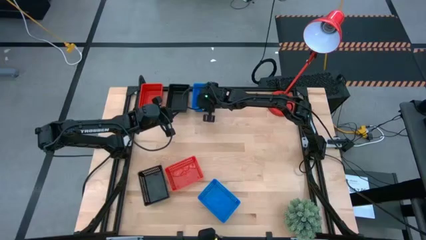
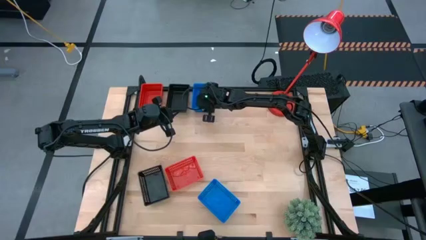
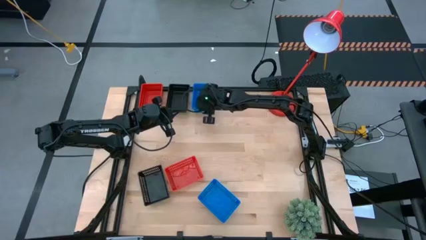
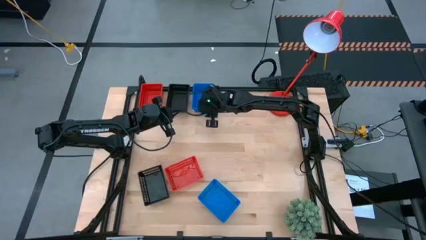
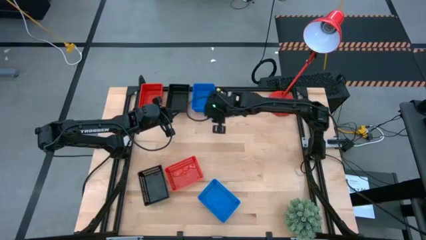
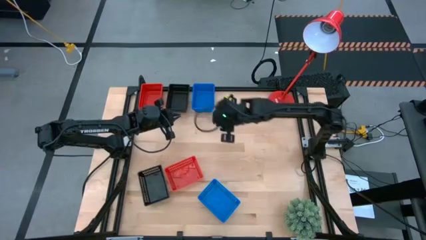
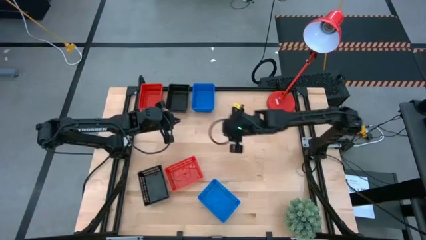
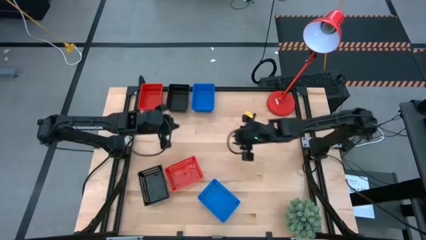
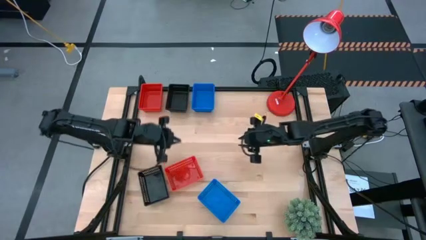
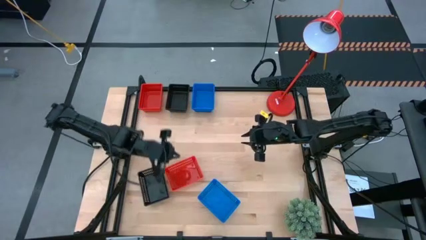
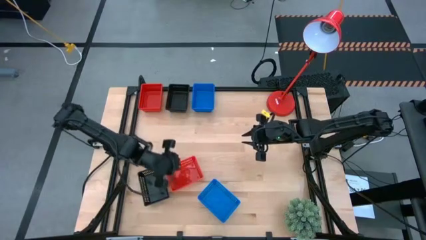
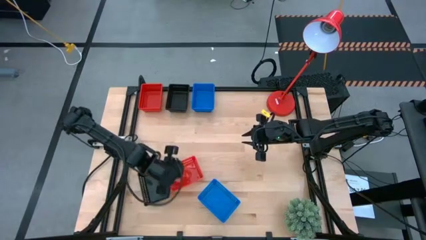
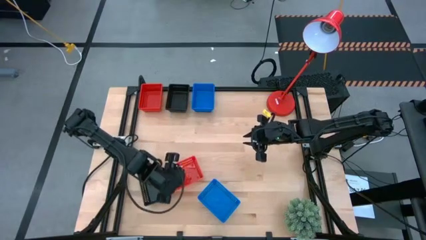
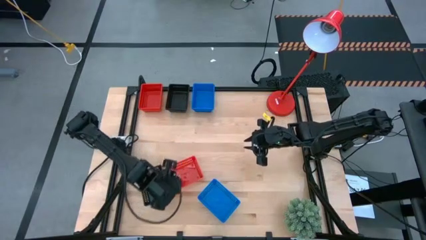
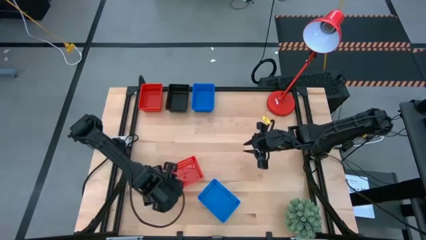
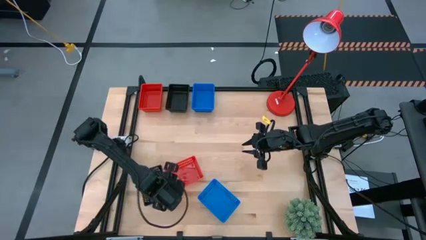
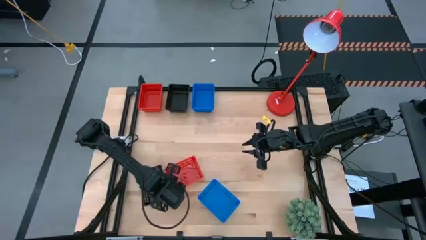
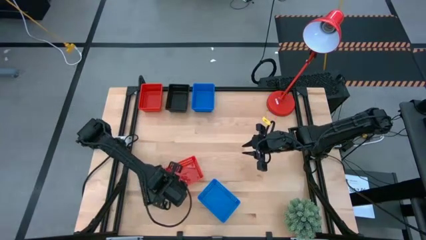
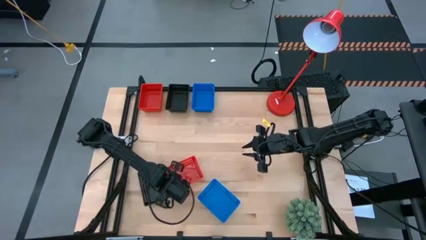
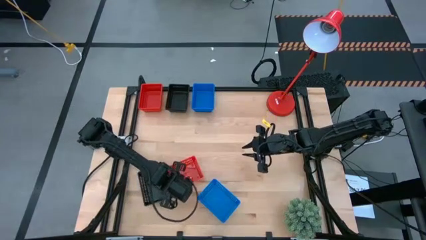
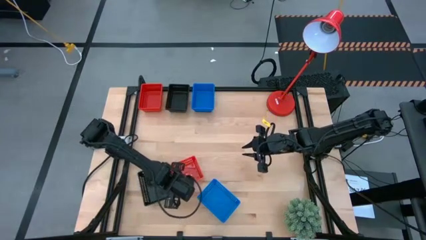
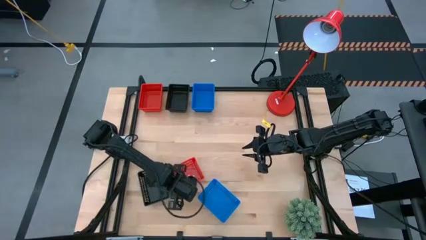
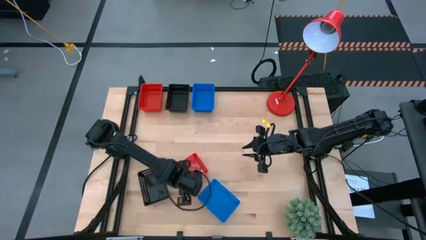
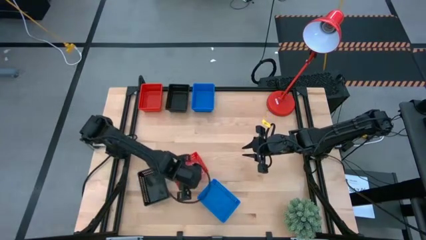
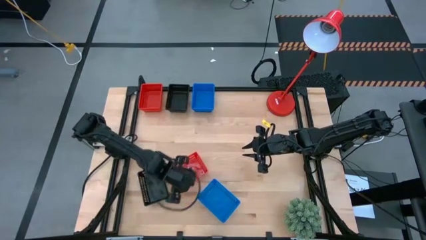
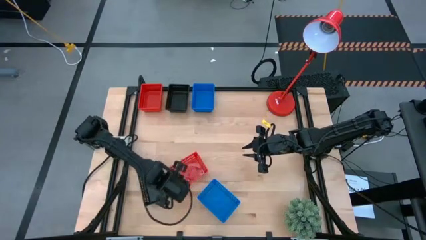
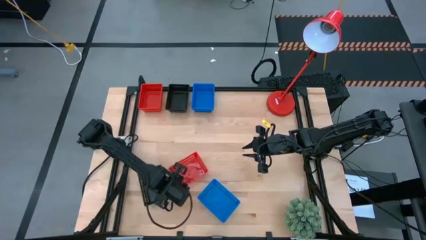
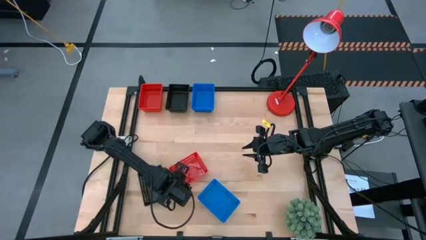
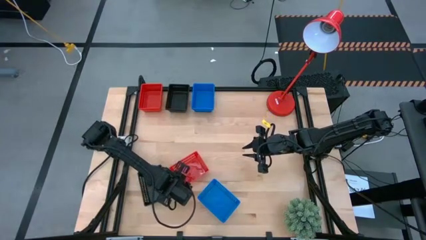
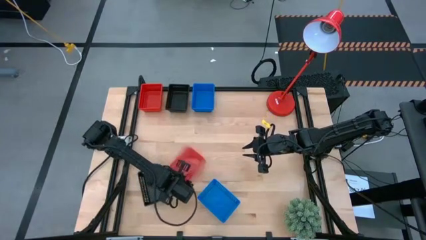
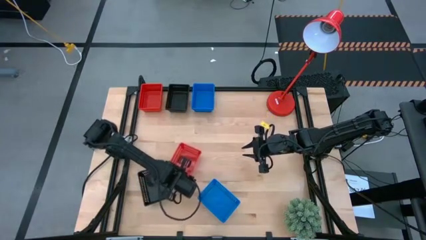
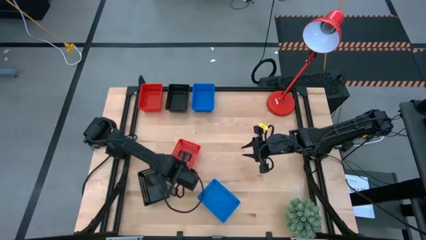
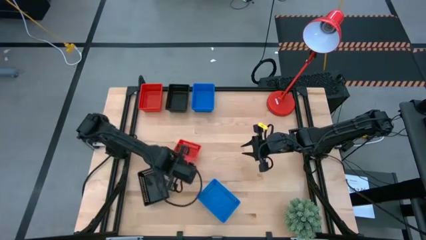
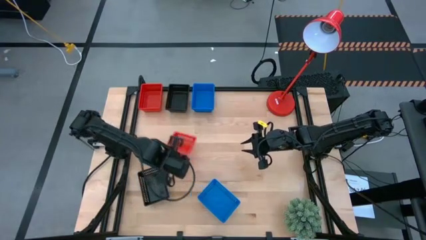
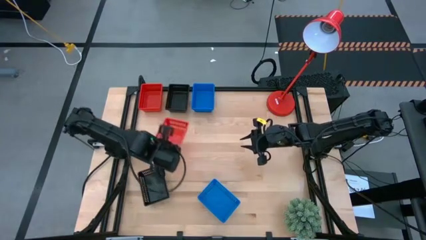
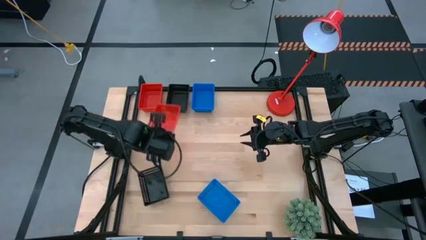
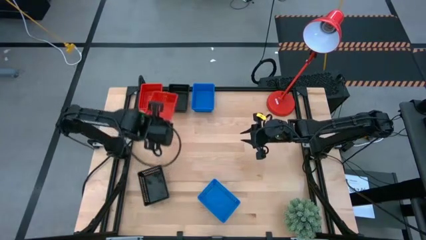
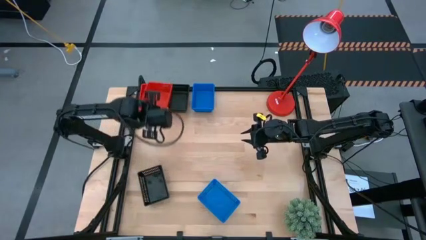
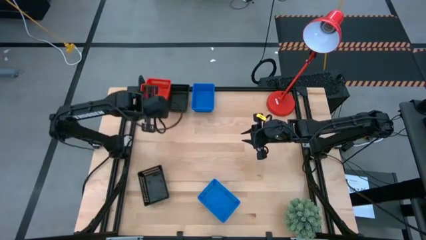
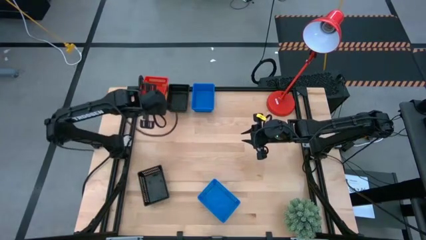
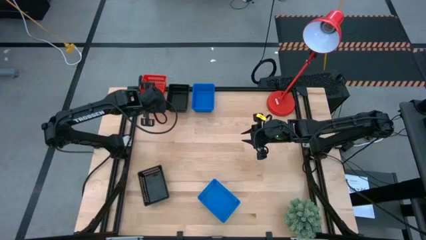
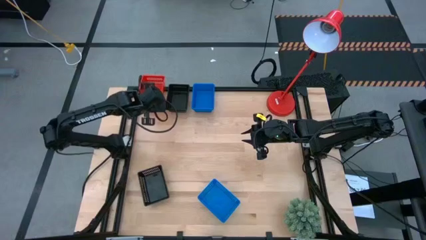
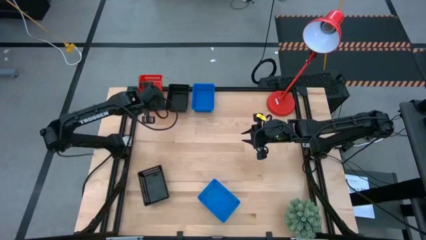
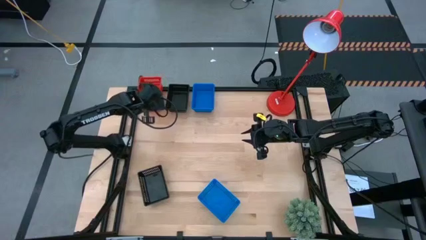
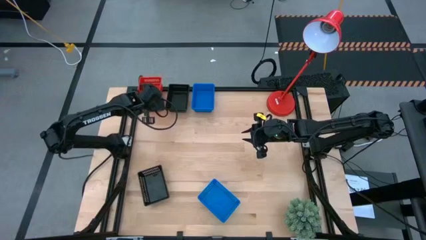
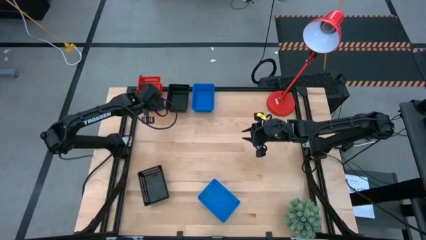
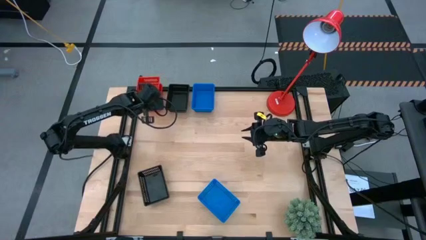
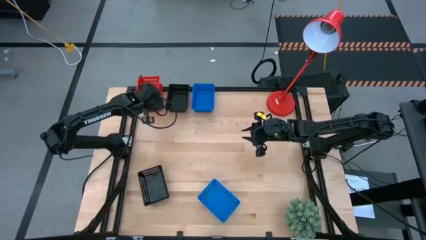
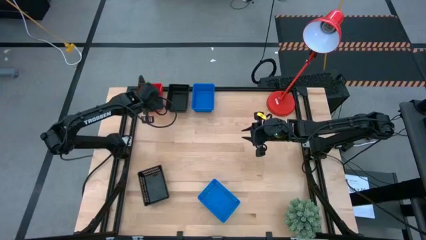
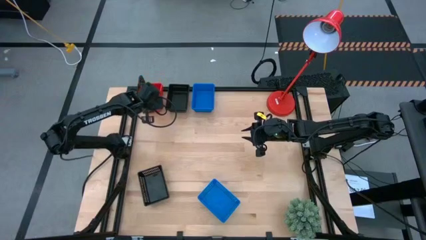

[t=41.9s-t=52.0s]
Stack the bottom red bin on top of the stacked red bins

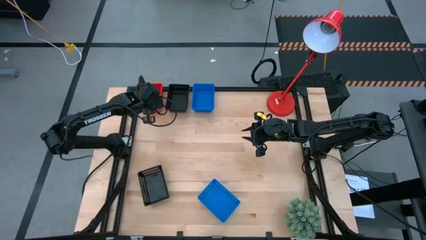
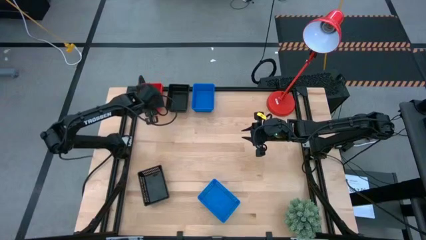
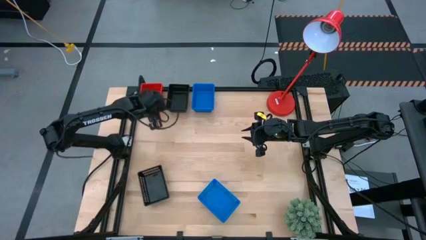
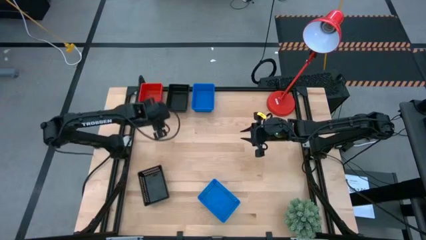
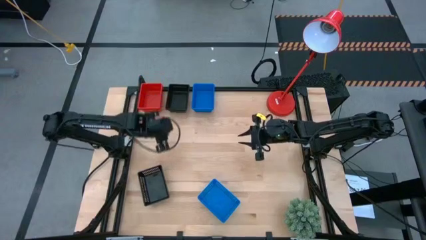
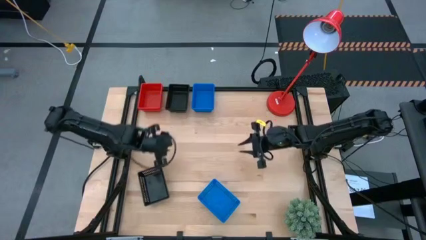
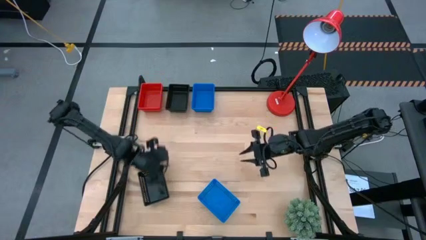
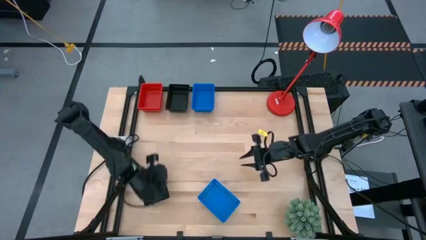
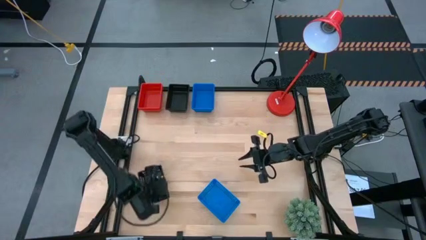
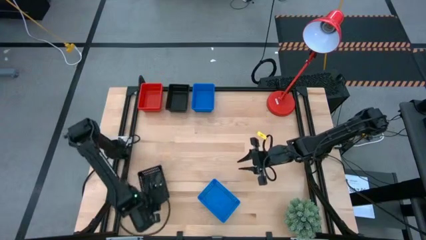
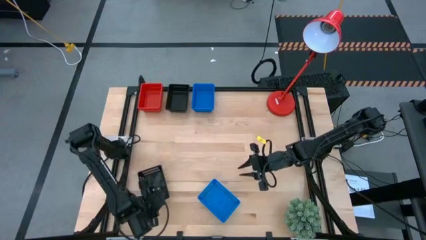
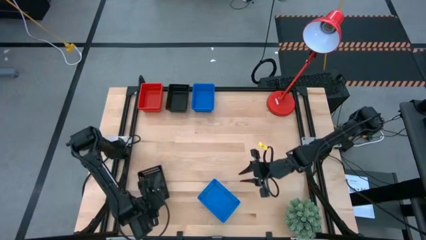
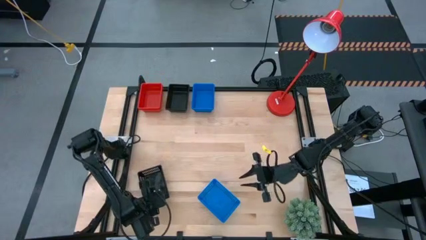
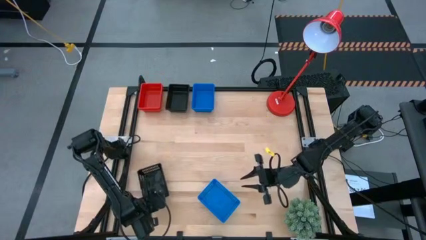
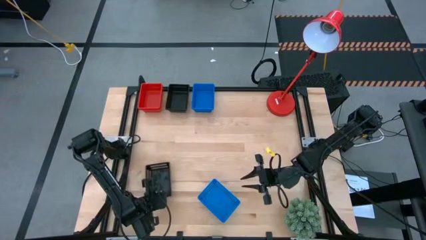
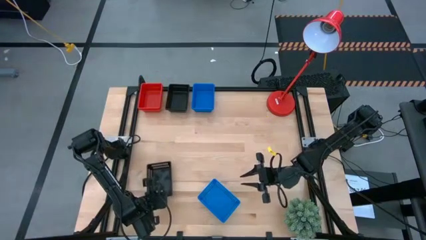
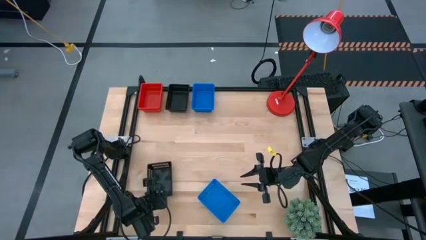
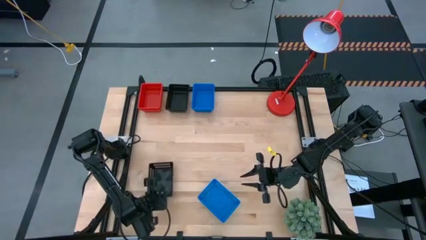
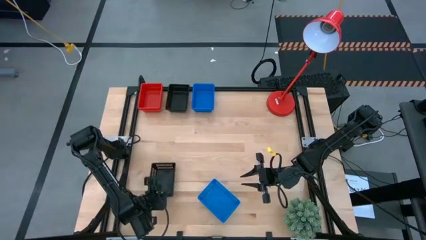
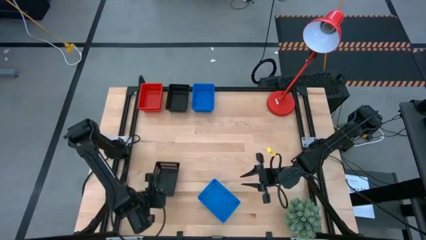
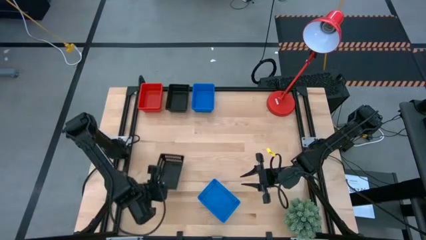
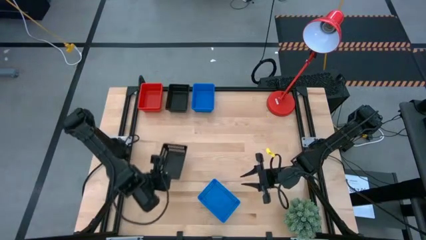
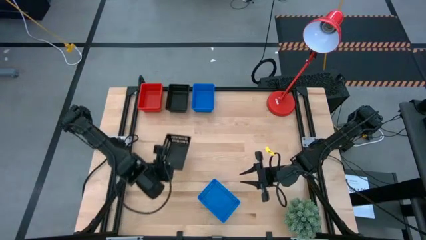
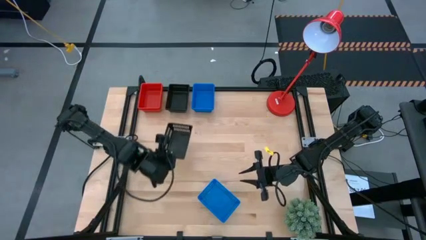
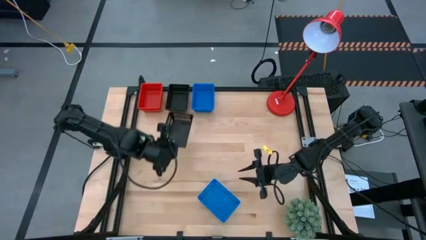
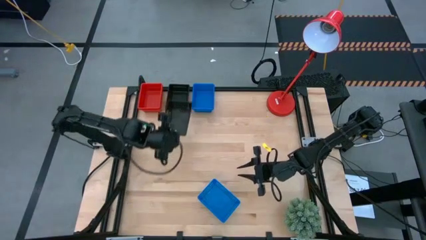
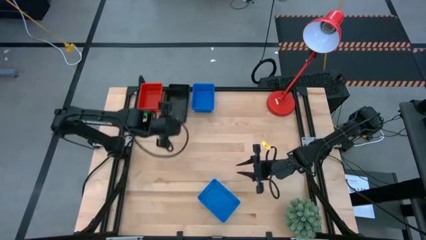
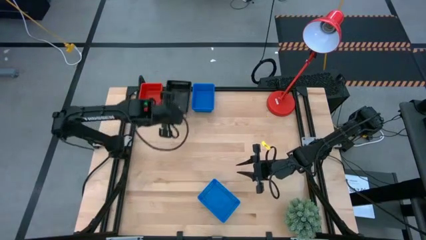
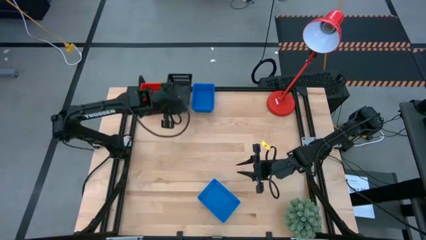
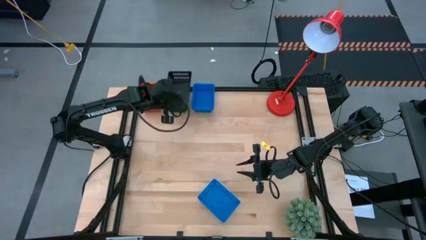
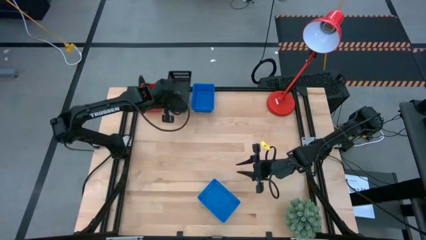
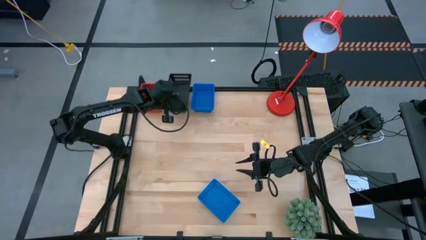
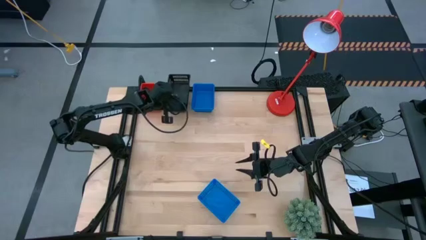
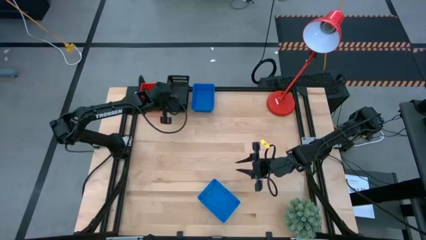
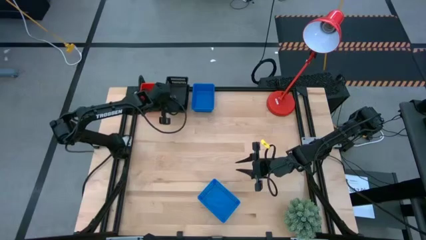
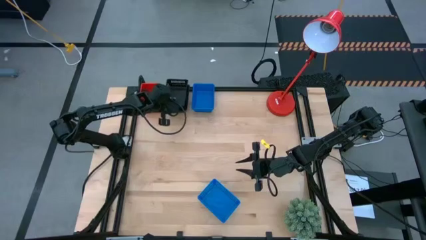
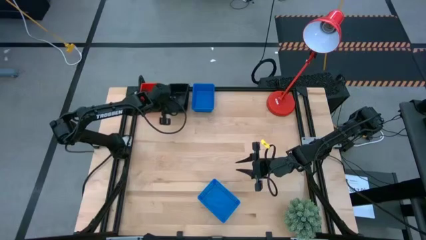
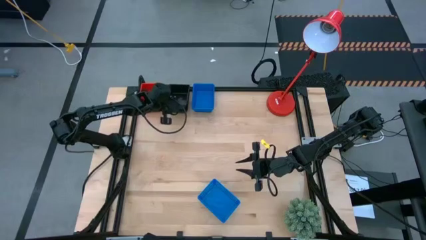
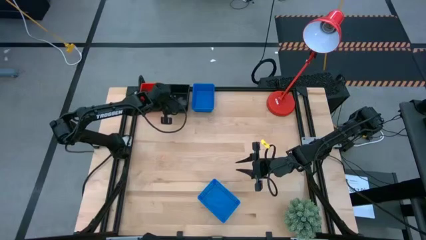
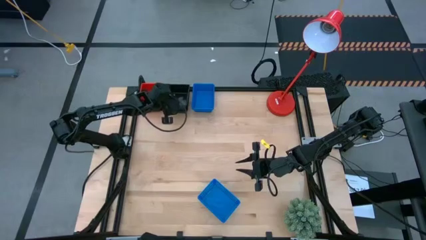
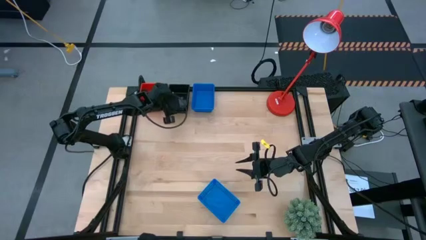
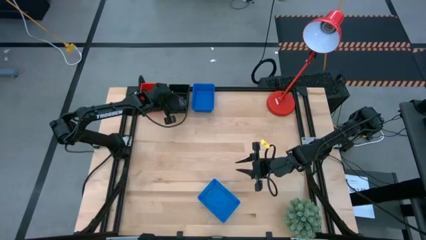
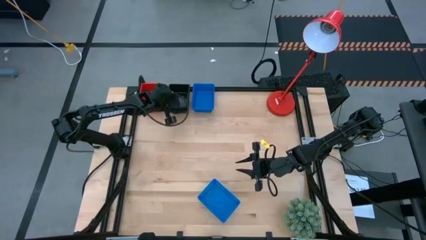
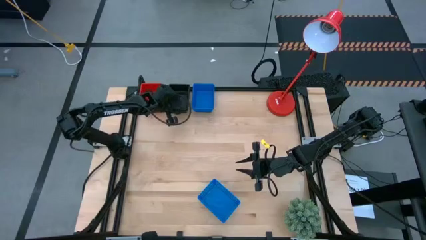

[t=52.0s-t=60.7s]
Stack the bottom black bin on top of the stacked black bins
